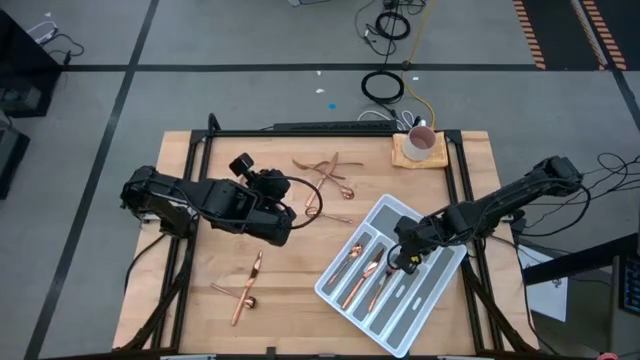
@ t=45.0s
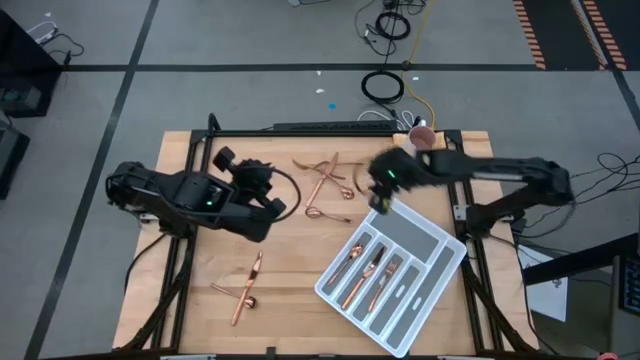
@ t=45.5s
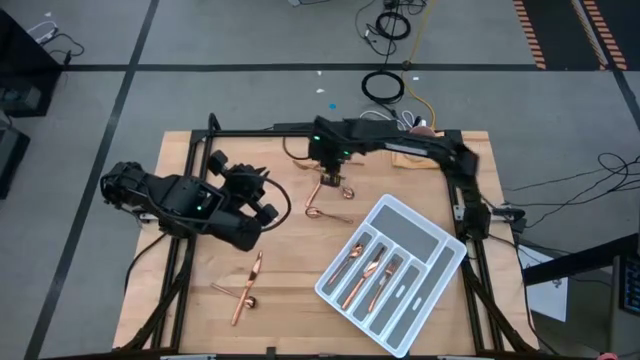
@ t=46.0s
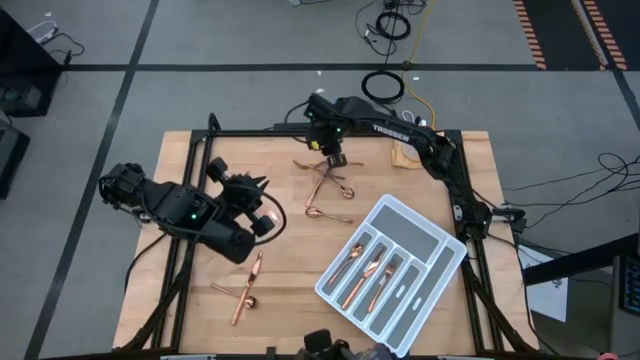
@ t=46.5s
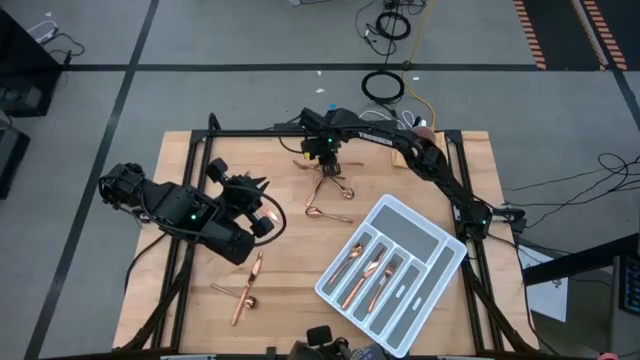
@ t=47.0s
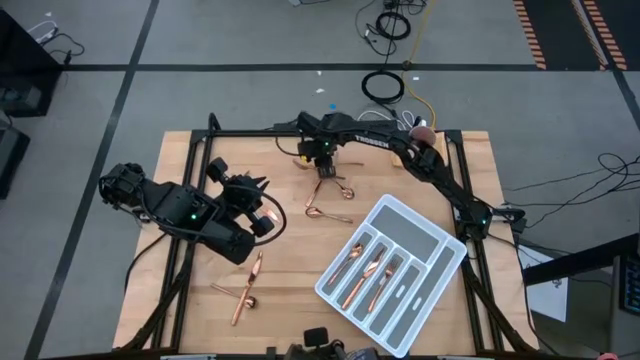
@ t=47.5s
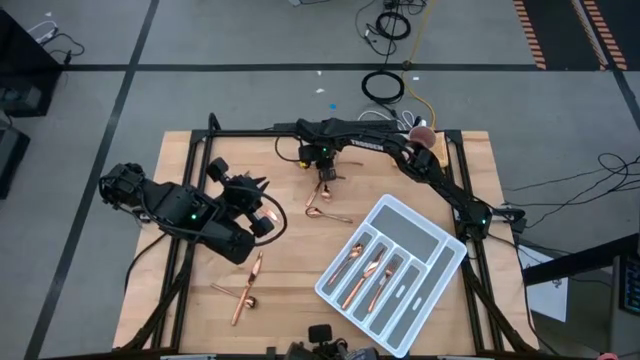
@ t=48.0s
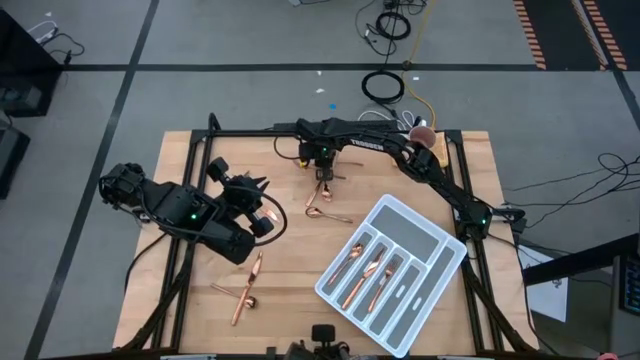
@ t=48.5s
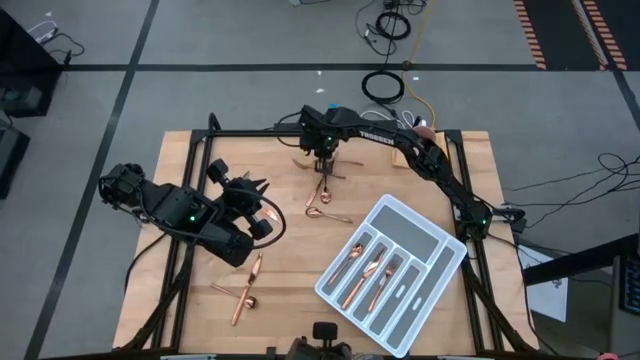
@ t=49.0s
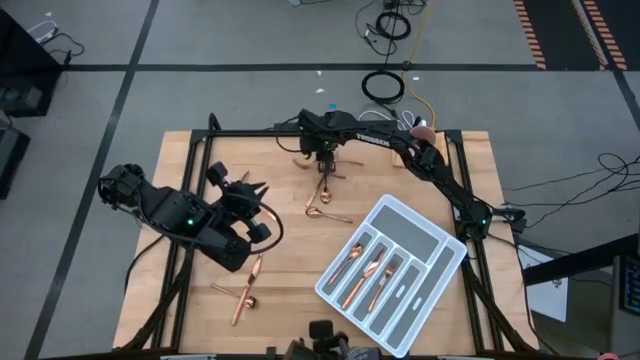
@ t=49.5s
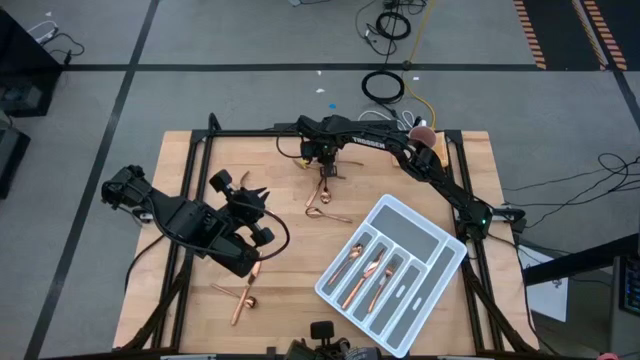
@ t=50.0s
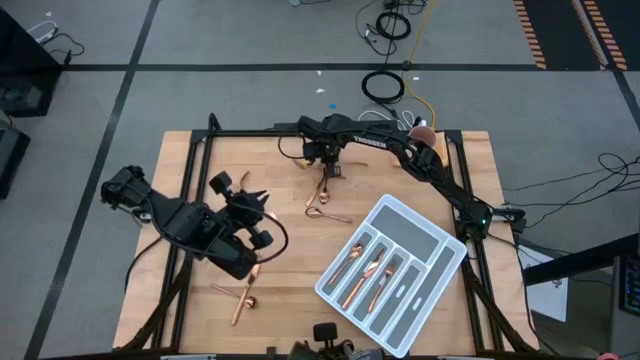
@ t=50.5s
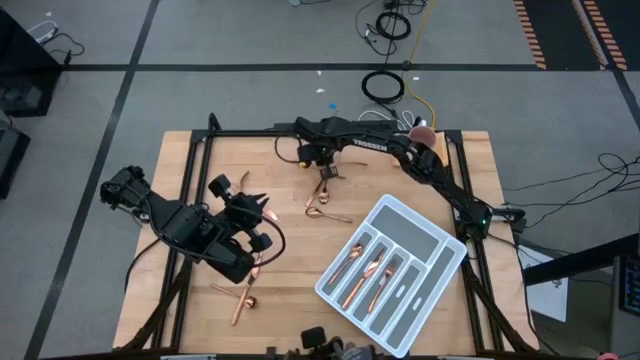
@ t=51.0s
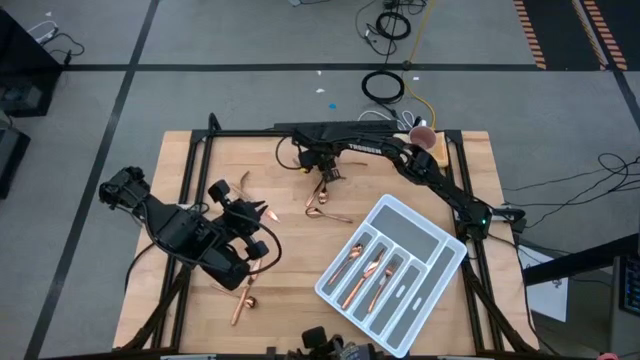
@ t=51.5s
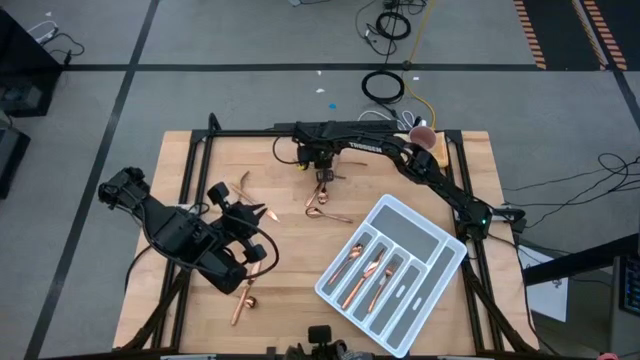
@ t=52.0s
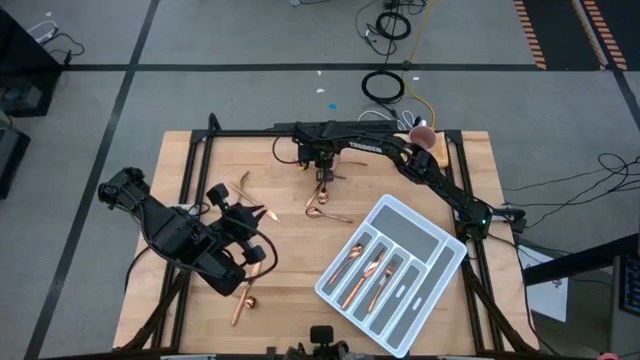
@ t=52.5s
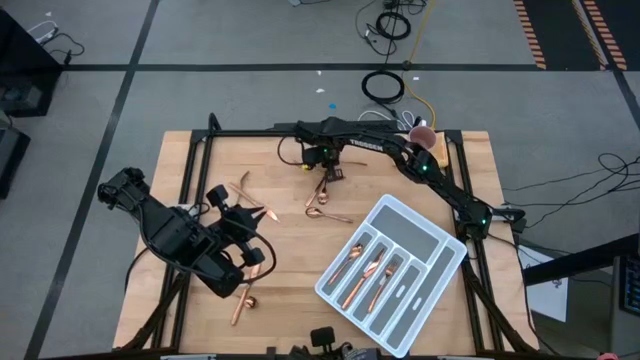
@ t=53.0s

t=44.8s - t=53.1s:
Task: Sort silverware
Put the gold fork into the cutlery tray with the other gold fork

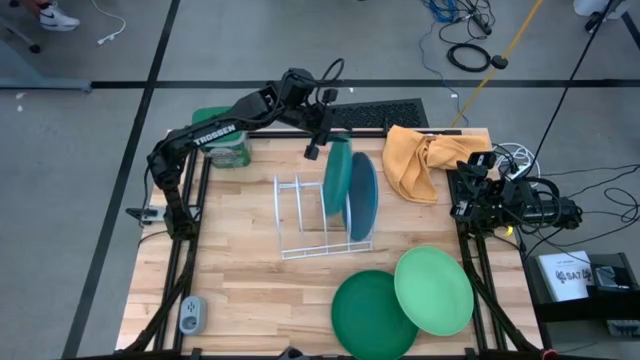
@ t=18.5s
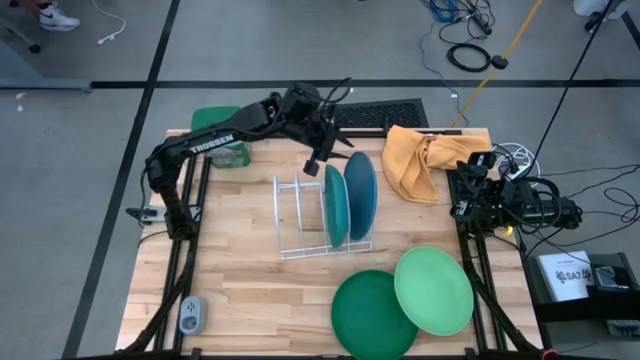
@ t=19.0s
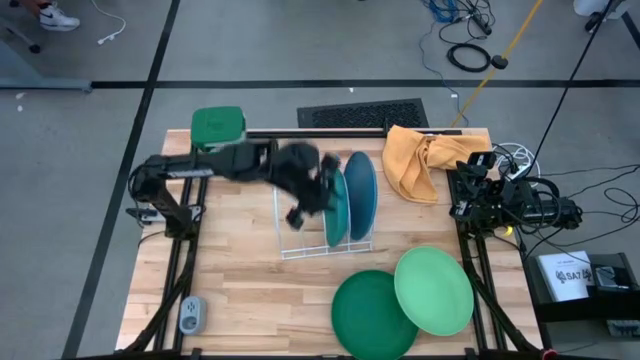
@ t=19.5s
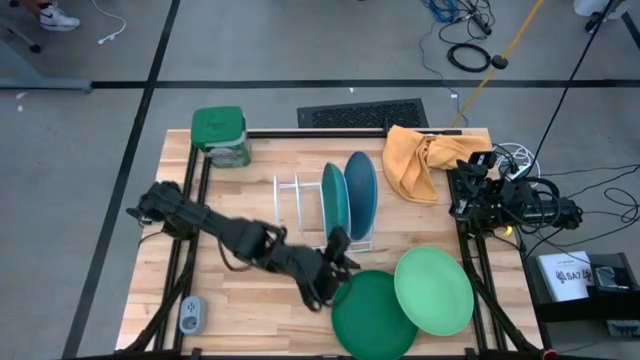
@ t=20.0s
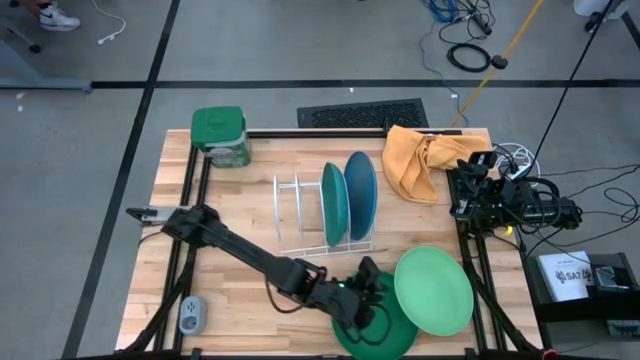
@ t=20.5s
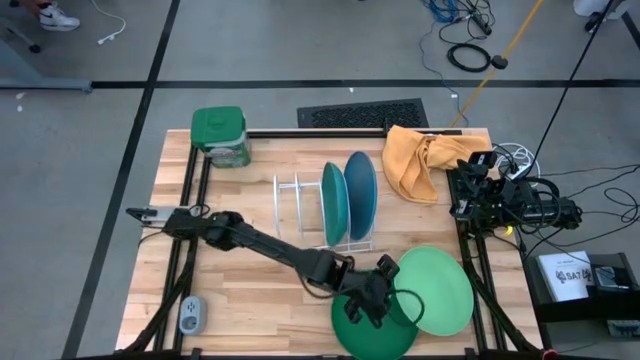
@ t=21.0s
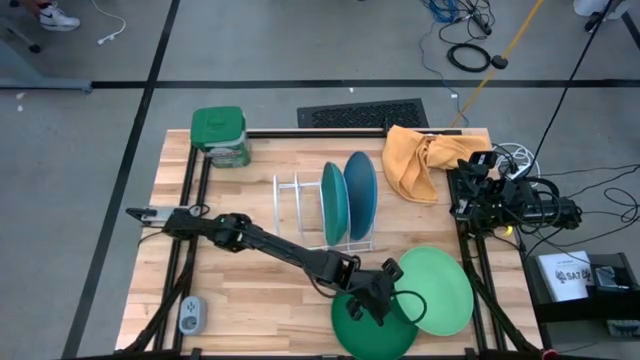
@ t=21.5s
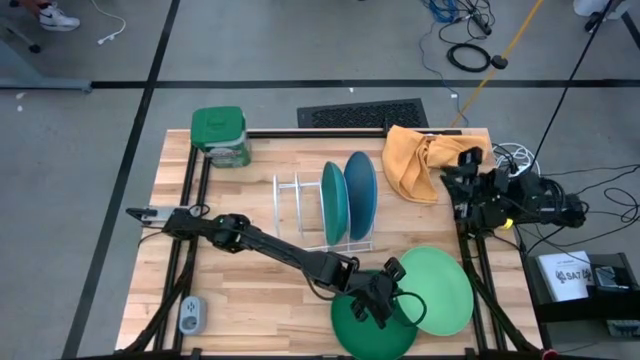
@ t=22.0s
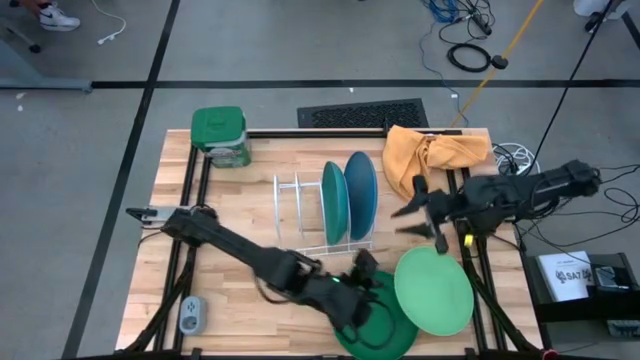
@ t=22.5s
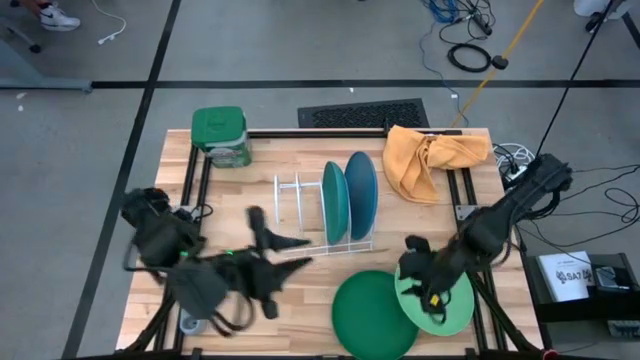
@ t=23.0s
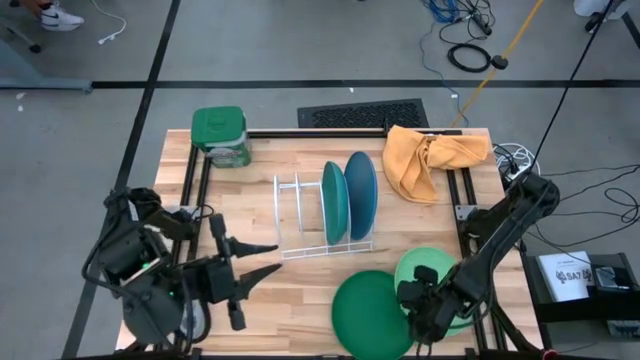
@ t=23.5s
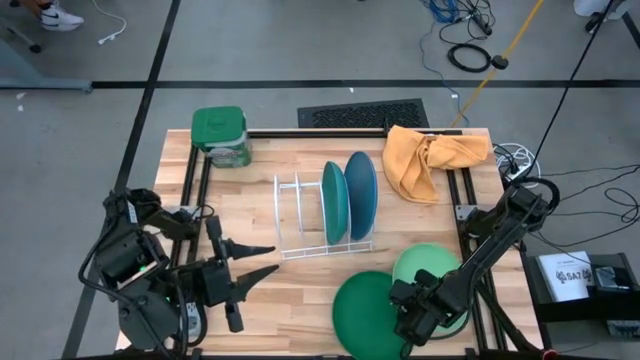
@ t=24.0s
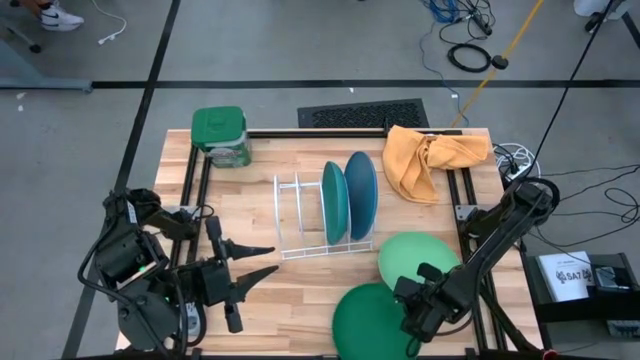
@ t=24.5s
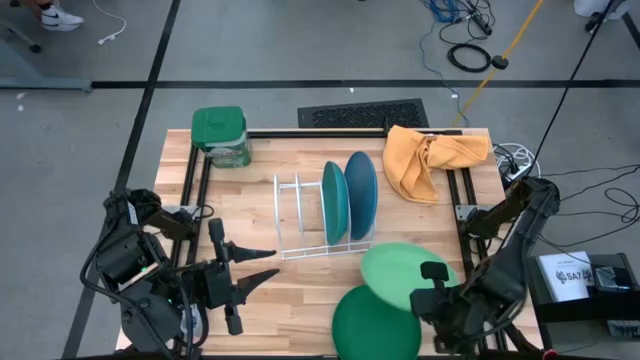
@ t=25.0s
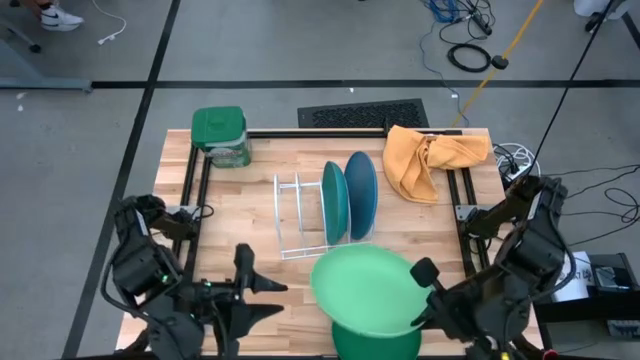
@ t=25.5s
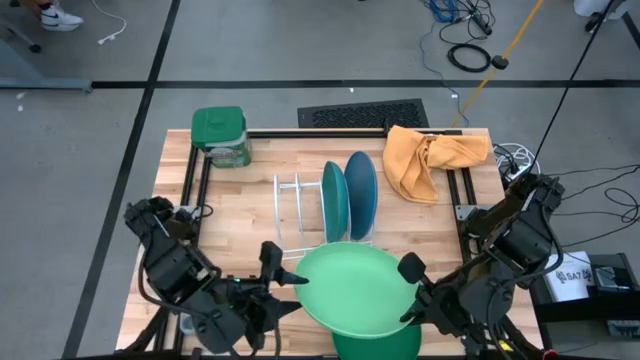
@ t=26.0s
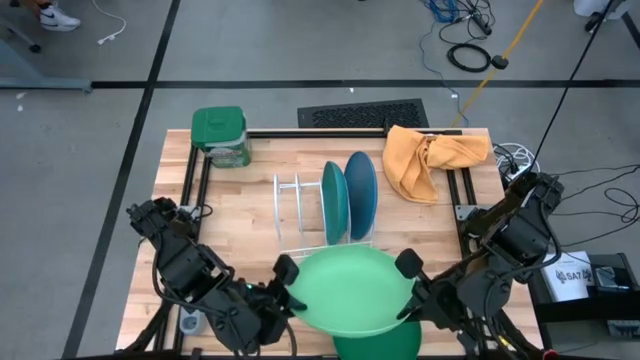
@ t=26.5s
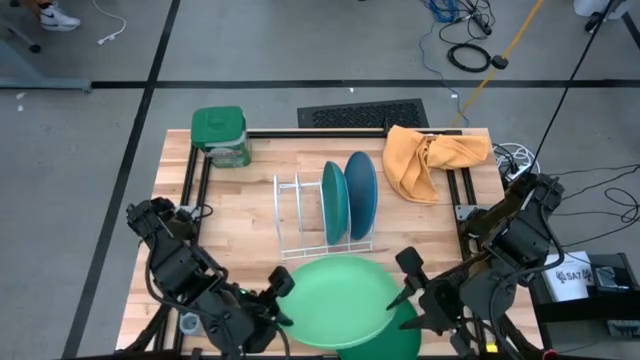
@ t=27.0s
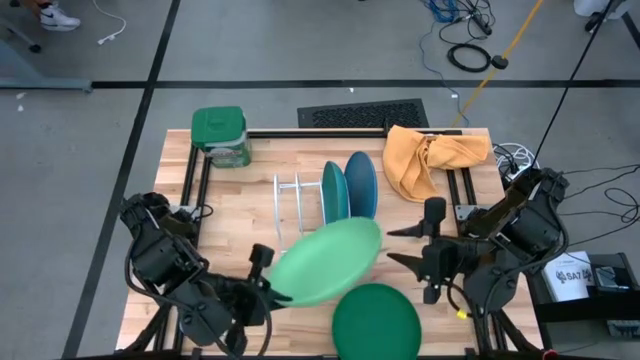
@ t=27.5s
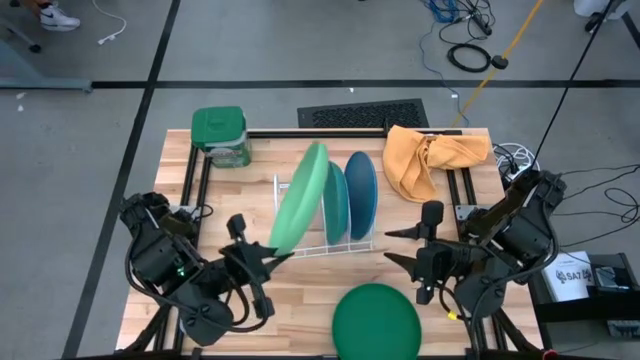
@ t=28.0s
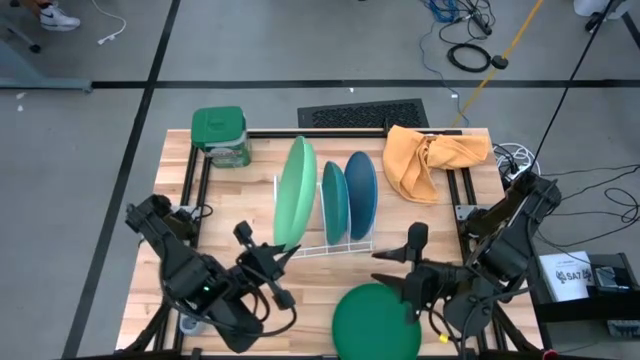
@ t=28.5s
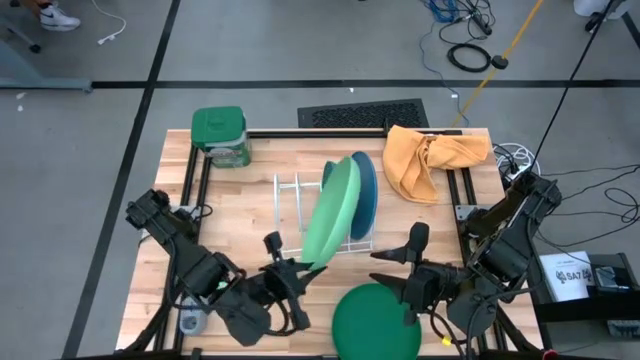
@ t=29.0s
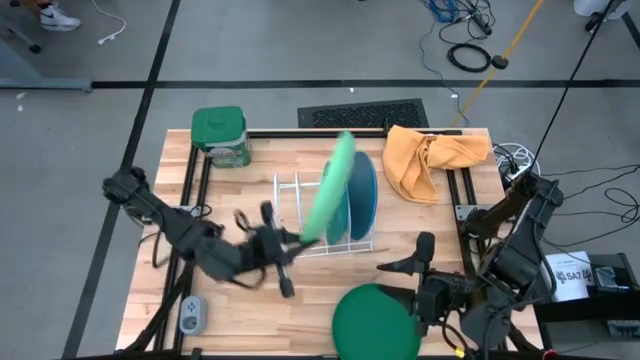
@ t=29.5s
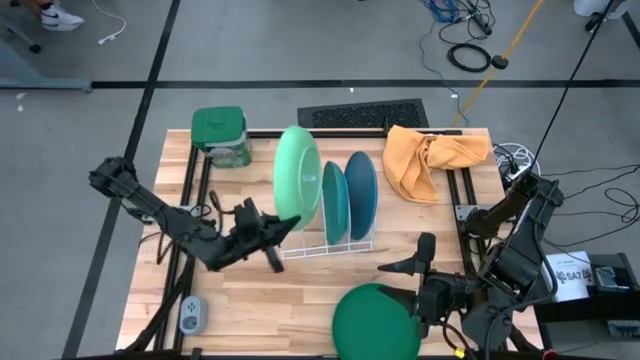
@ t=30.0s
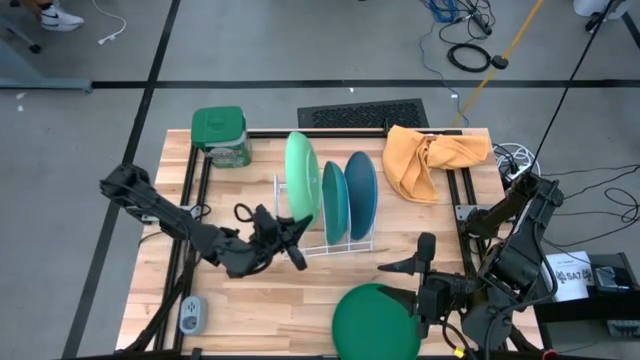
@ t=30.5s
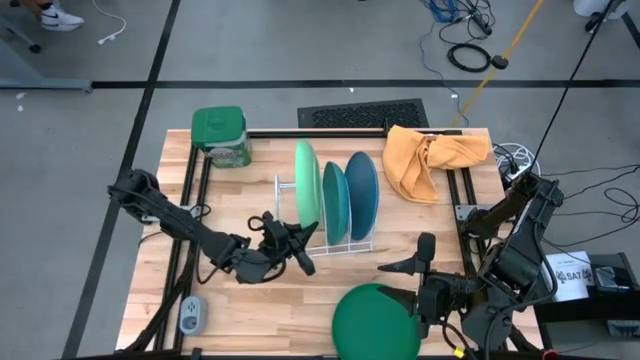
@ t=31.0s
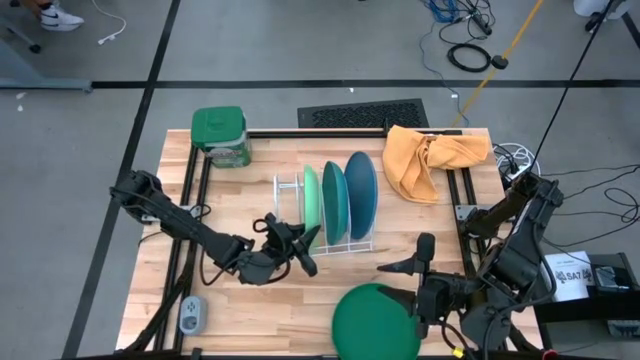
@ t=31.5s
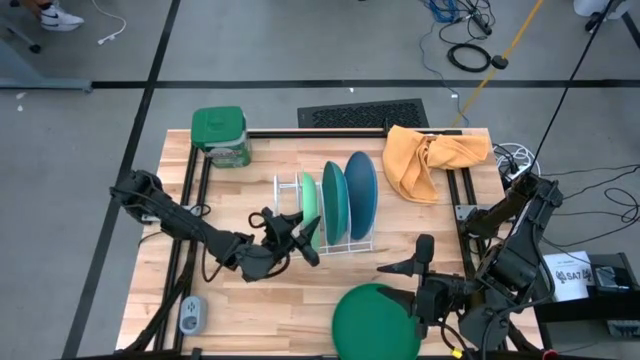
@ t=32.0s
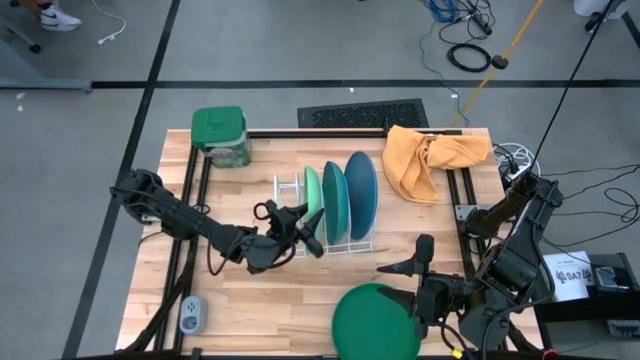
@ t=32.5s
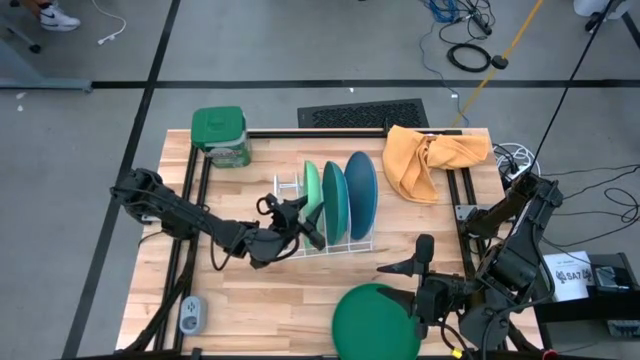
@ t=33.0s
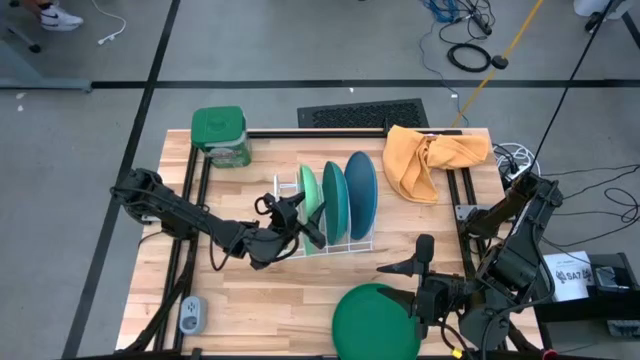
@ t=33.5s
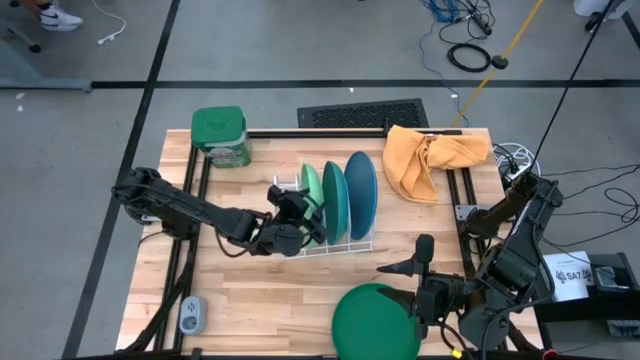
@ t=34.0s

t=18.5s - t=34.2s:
Task: Sort dishes
Put the light green plate into the dish rack
